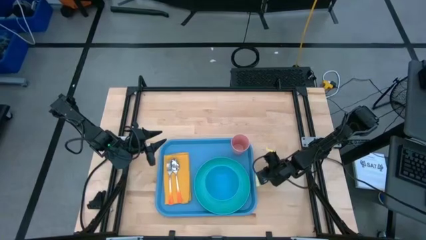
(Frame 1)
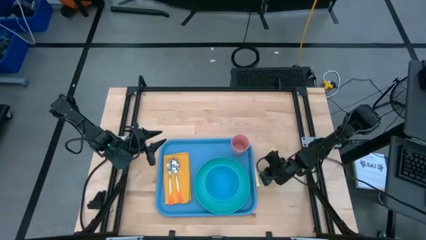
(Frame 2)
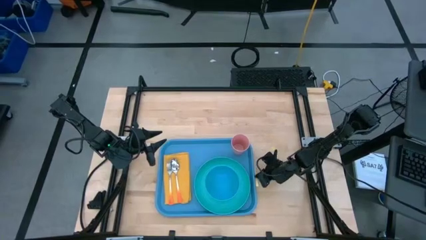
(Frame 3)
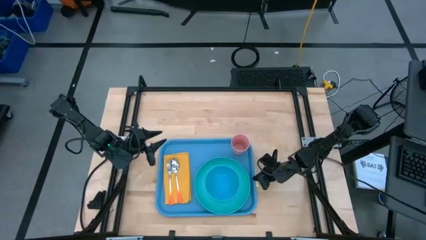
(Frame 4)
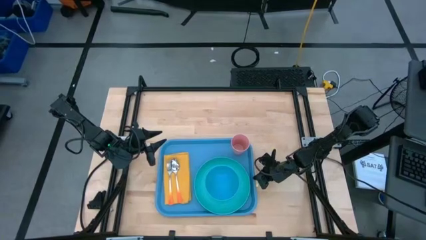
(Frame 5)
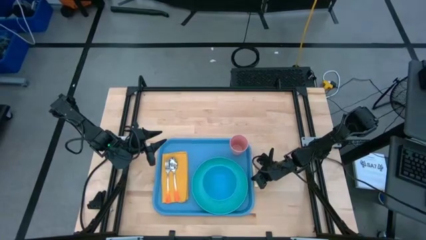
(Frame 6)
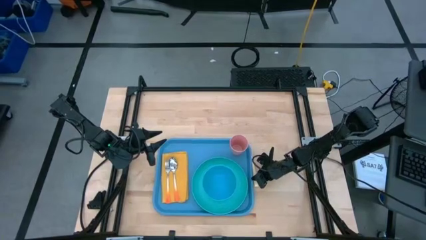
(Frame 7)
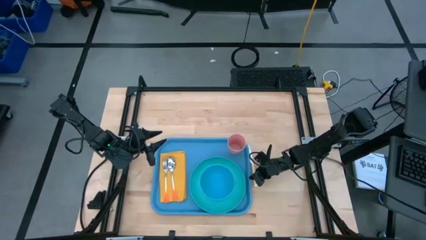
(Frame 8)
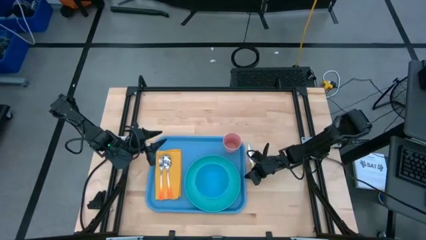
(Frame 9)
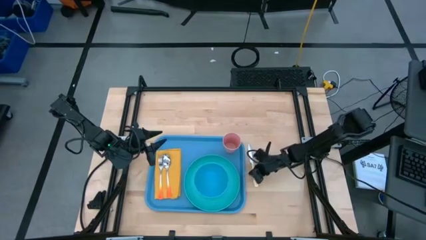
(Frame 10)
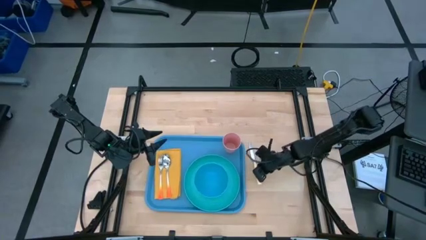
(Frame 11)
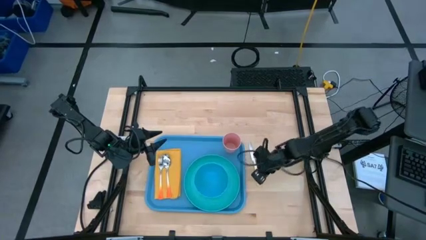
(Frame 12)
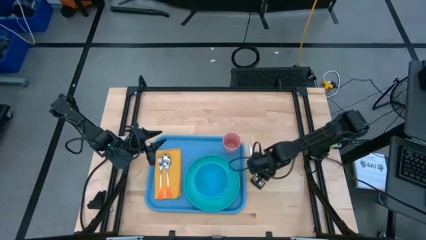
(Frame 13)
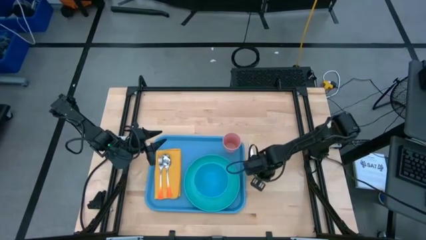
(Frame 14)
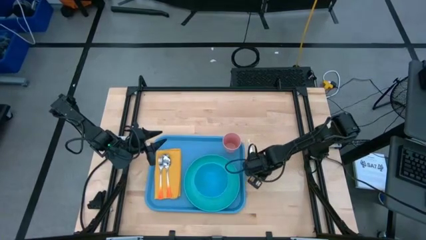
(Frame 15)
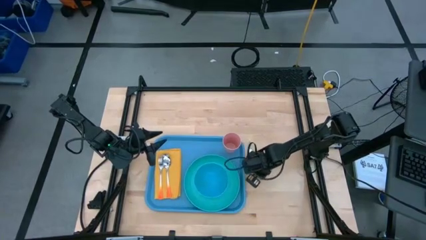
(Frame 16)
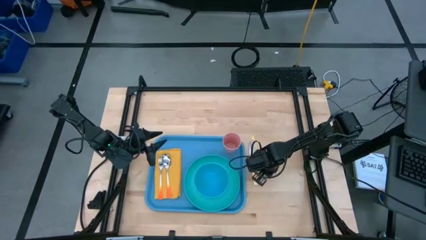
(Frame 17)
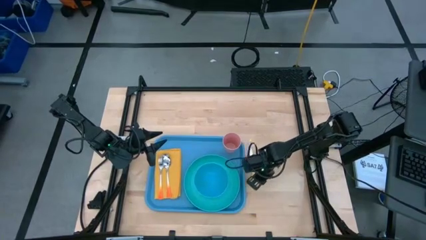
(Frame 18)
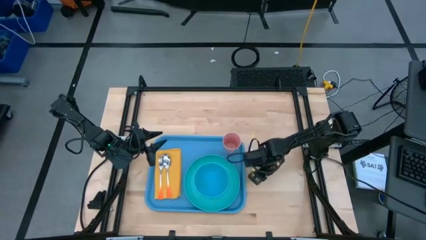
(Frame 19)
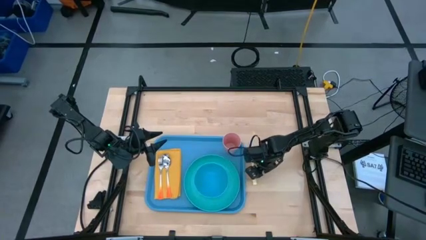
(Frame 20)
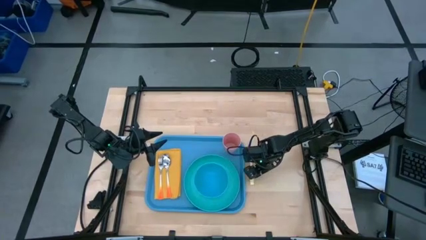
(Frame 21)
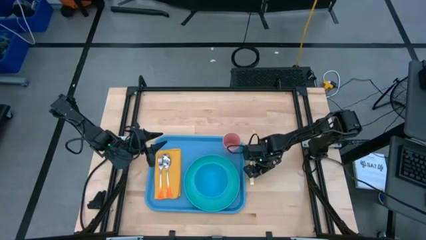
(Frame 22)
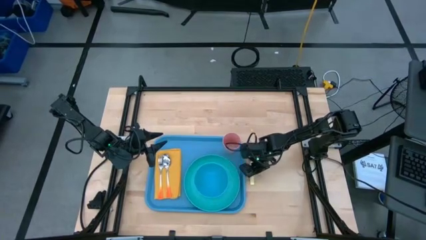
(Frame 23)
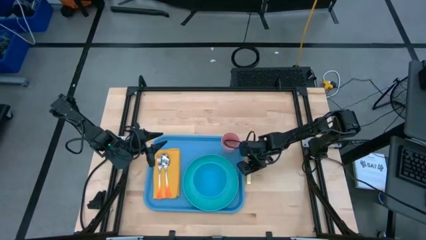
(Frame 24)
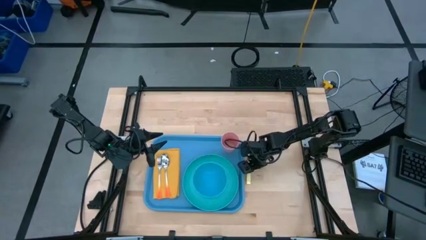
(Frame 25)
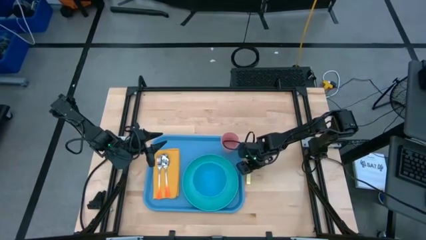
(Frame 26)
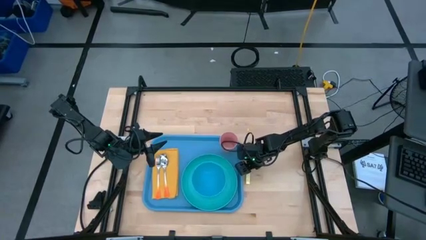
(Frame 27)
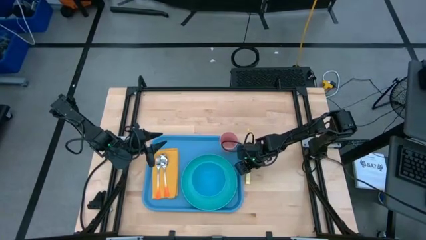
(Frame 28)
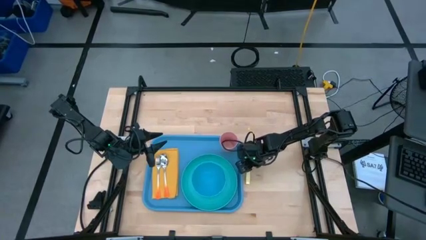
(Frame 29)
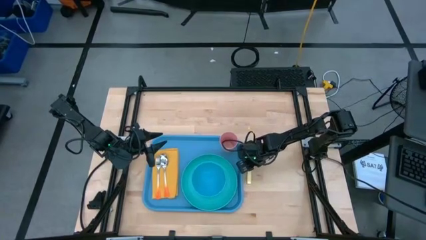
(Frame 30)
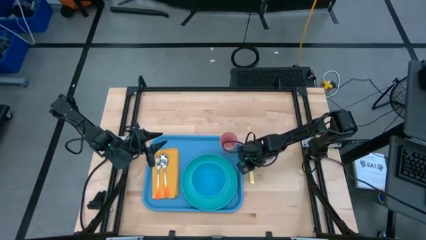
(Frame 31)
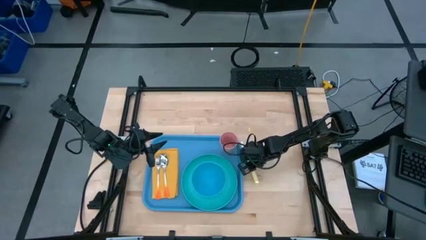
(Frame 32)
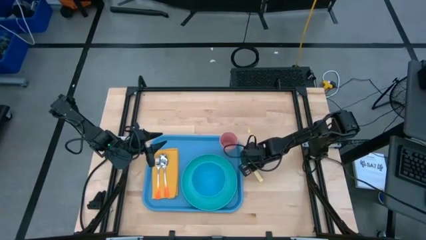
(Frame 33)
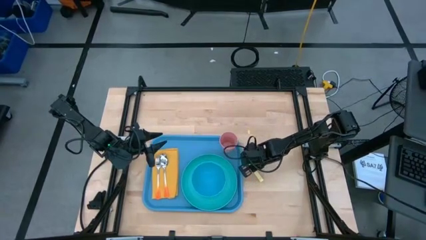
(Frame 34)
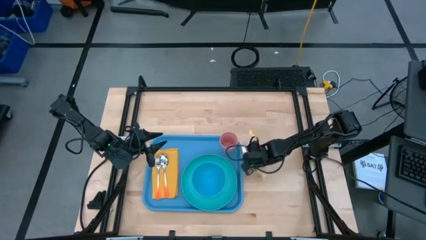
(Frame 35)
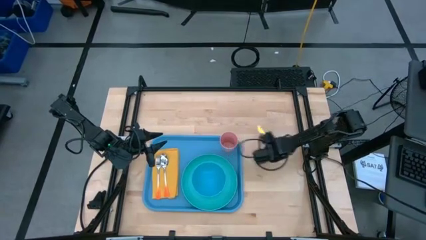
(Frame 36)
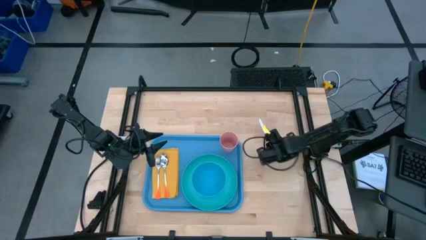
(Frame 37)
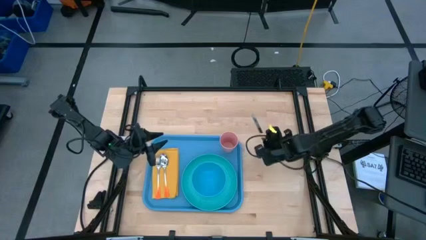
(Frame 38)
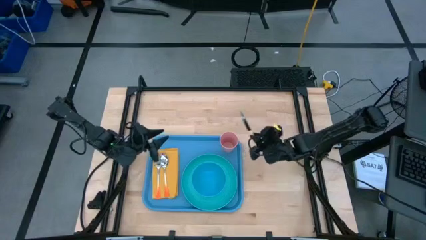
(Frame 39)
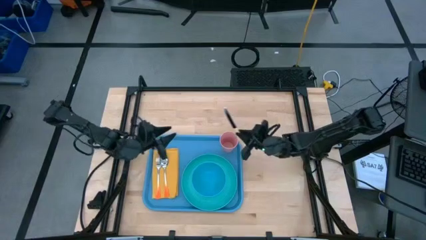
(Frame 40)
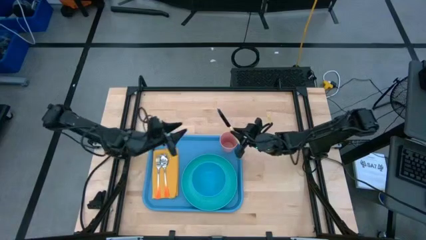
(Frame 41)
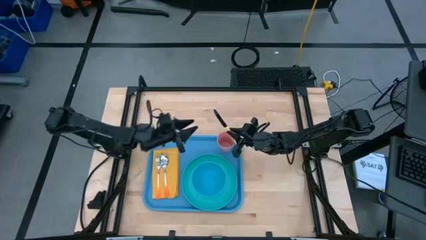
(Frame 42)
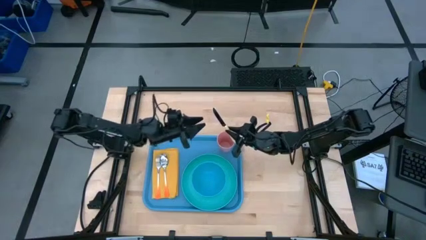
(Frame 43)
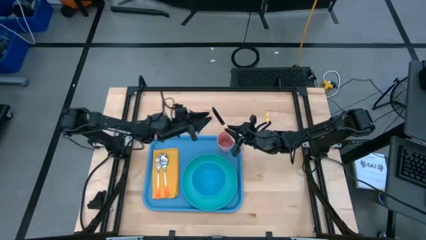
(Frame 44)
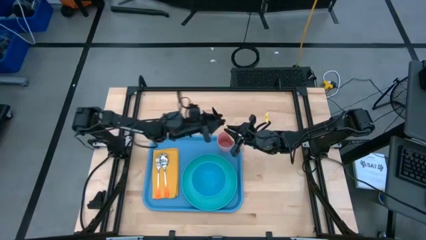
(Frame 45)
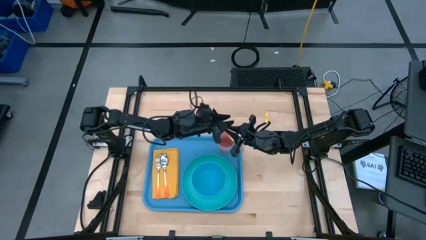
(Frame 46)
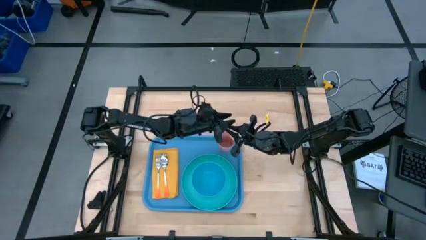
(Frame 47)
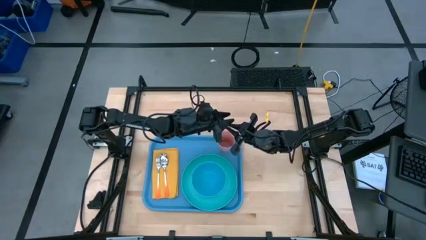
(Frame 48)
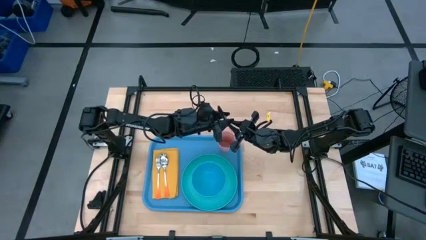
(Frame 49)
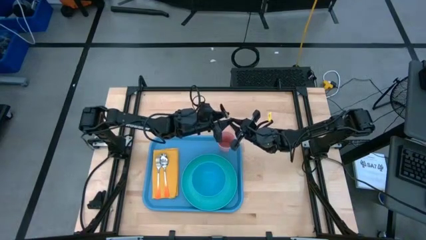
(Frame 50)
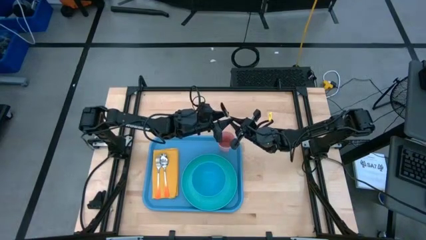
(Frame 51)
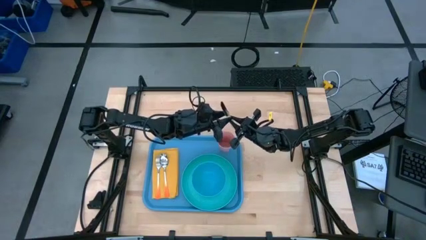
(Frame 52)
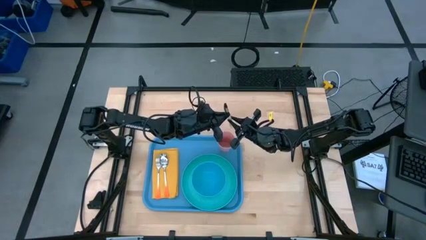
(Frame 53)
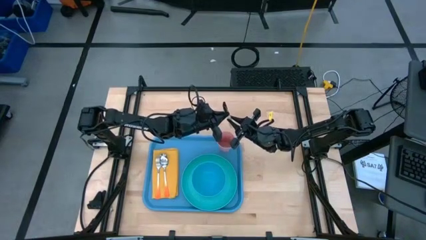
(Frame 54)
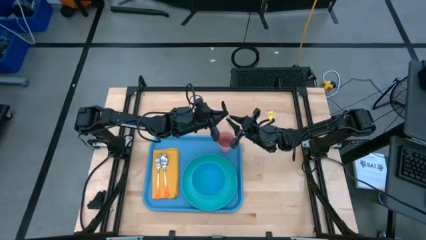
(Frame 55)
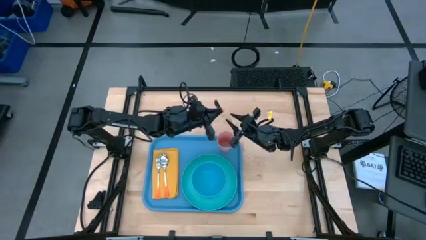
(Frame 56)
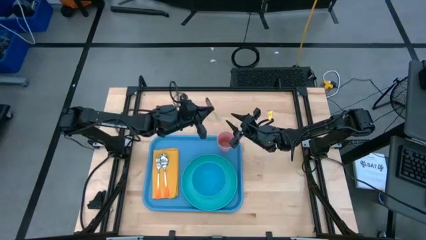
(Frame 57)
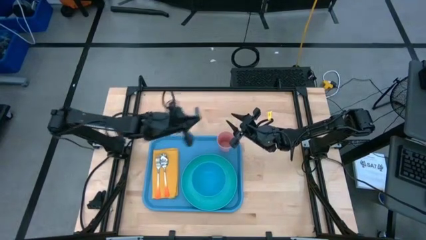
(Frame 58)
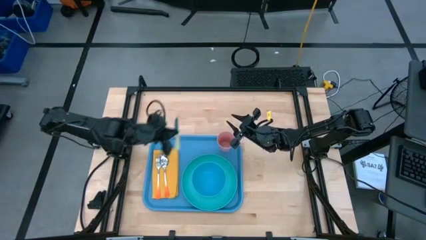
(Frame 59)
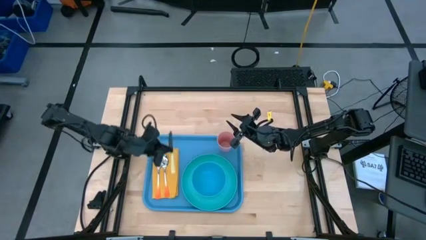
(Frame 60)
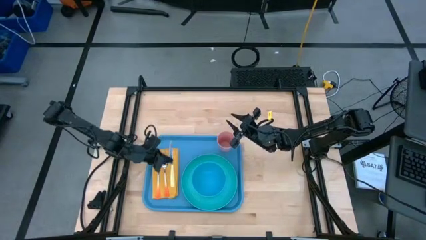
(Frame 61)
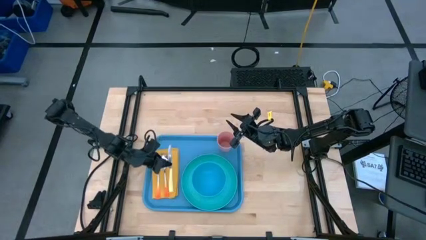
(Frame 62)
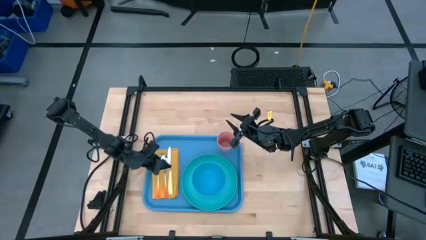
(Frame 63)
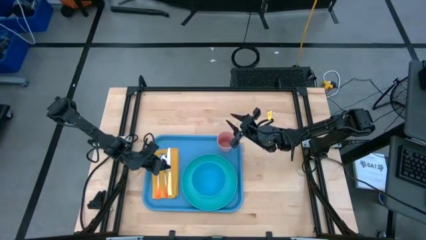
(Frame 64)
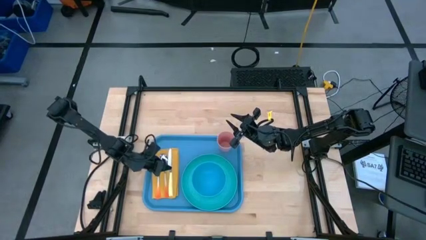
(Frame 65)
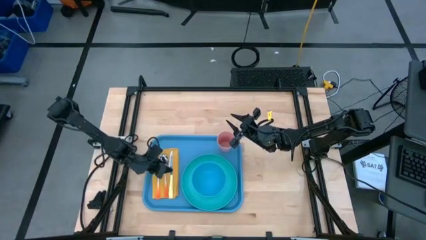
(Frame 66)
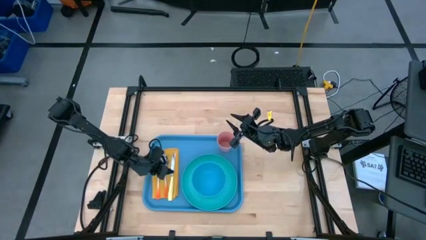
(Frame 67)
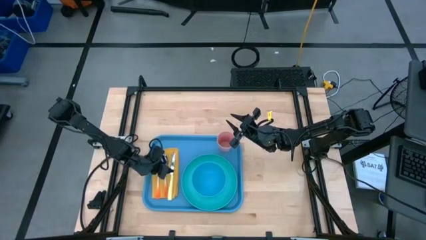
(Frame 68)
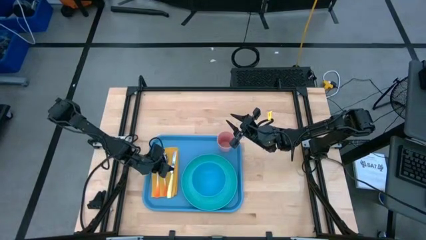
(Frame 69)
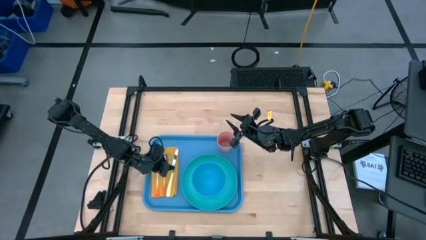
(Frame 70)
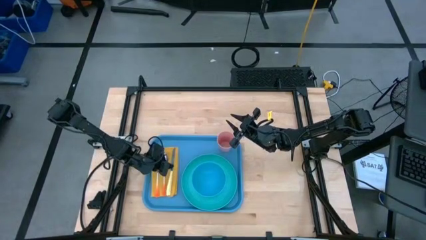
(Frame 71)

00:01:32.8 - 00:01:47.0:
Task: Set up tray
Put the yellow table knife on the yellow napkin to the right of the orange spoon
